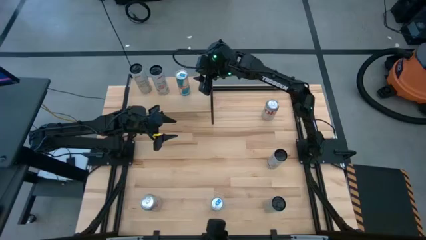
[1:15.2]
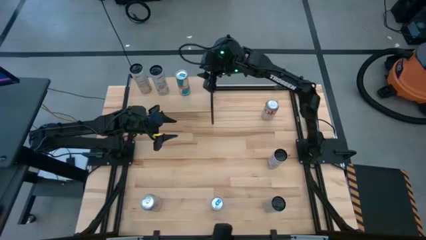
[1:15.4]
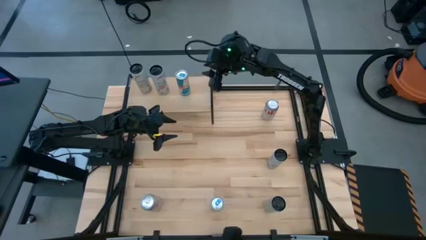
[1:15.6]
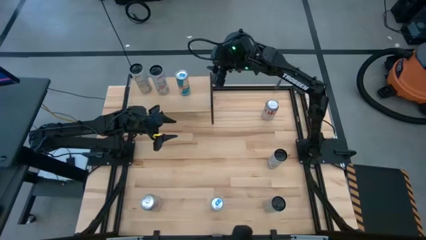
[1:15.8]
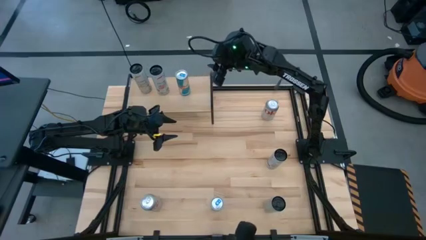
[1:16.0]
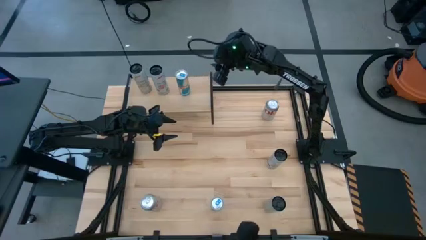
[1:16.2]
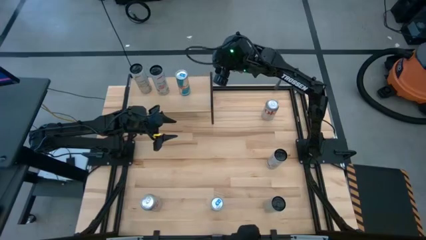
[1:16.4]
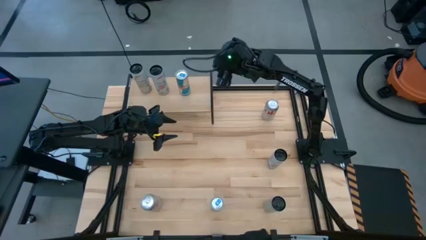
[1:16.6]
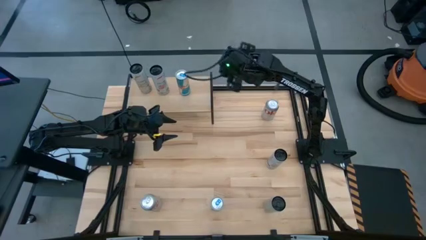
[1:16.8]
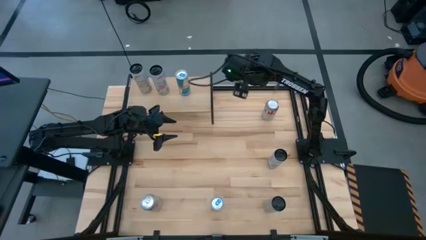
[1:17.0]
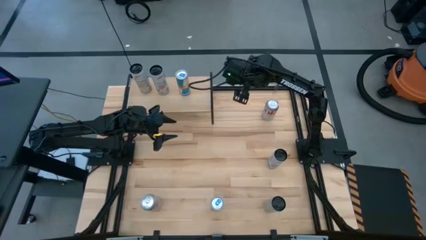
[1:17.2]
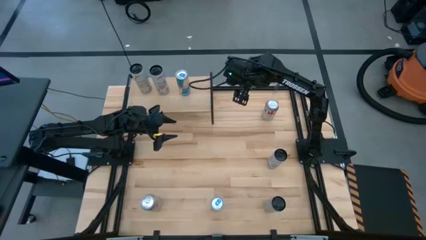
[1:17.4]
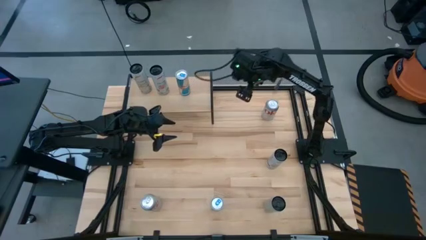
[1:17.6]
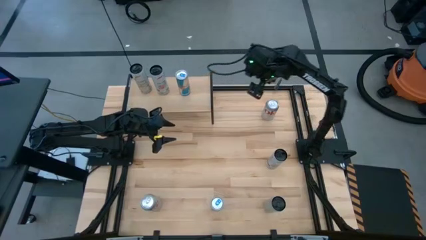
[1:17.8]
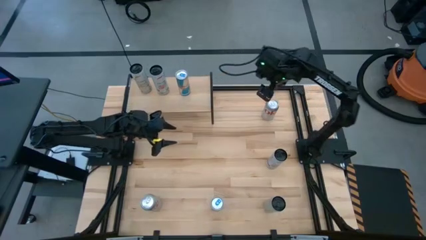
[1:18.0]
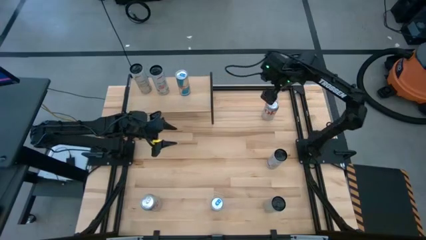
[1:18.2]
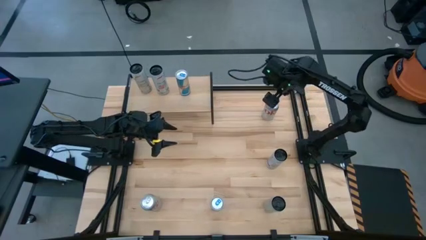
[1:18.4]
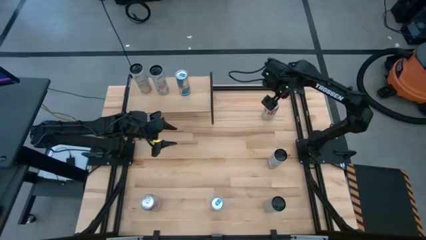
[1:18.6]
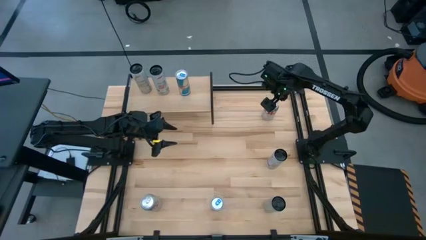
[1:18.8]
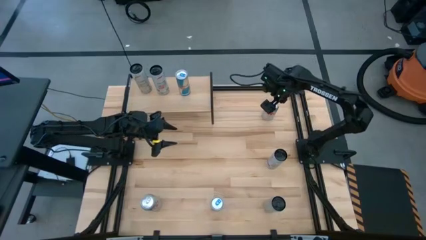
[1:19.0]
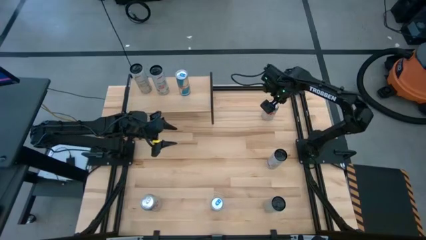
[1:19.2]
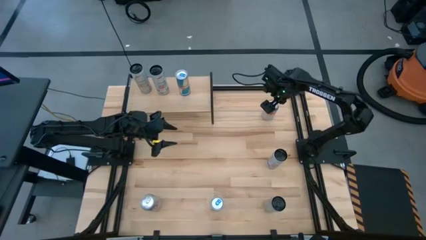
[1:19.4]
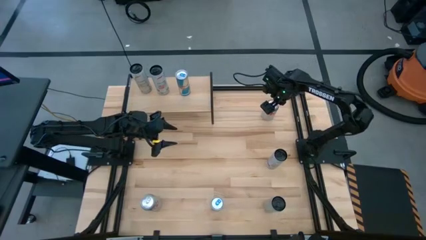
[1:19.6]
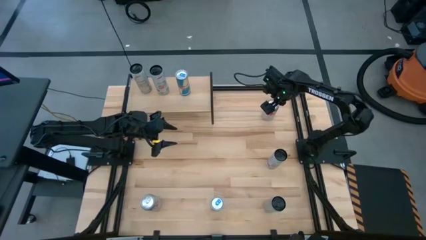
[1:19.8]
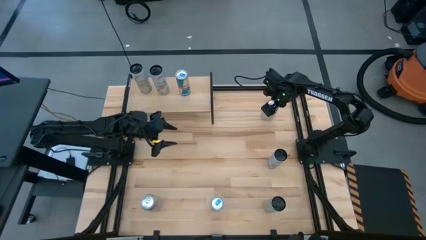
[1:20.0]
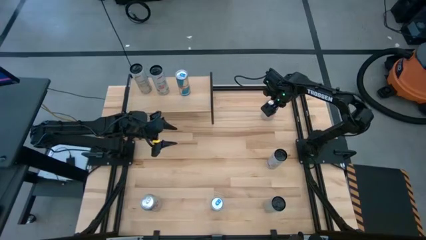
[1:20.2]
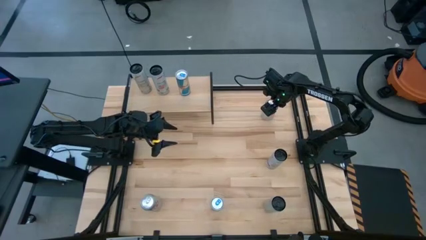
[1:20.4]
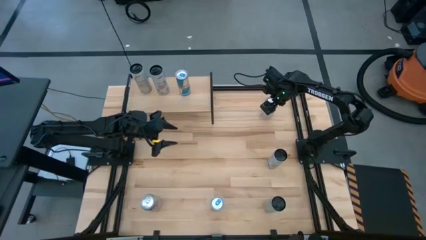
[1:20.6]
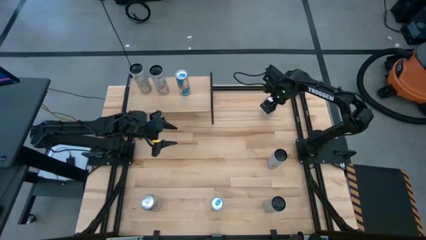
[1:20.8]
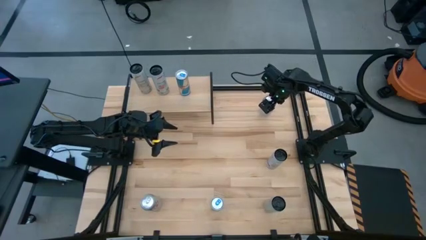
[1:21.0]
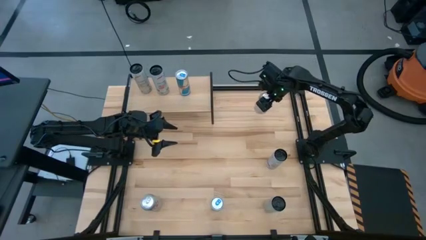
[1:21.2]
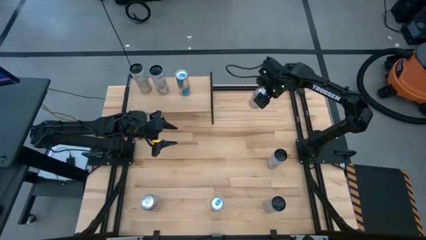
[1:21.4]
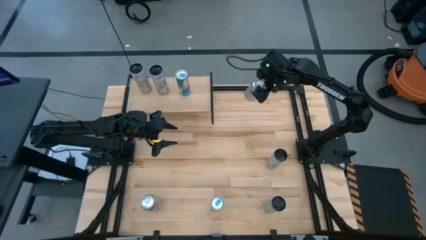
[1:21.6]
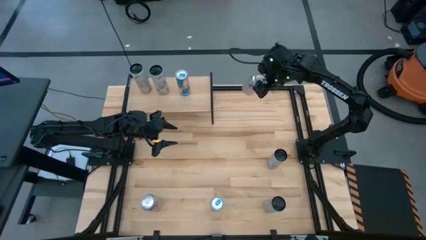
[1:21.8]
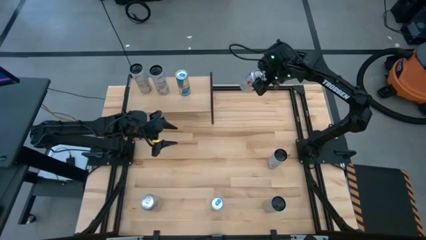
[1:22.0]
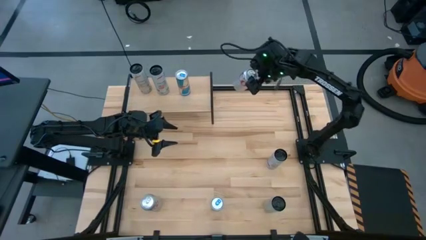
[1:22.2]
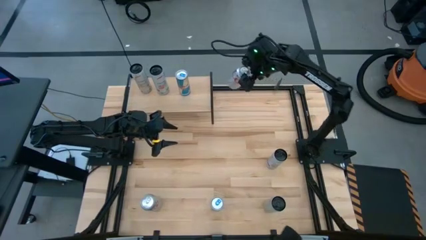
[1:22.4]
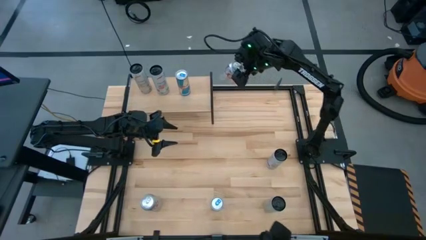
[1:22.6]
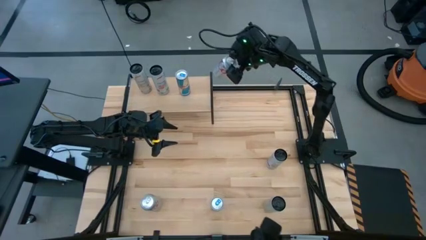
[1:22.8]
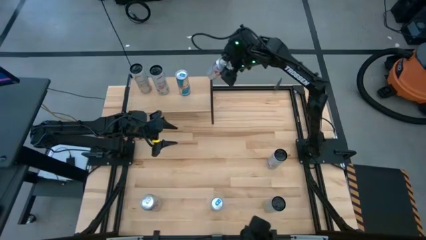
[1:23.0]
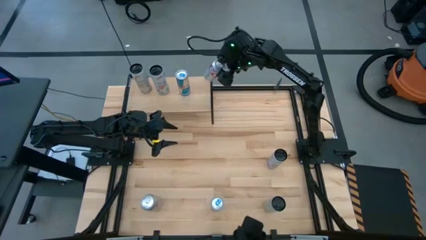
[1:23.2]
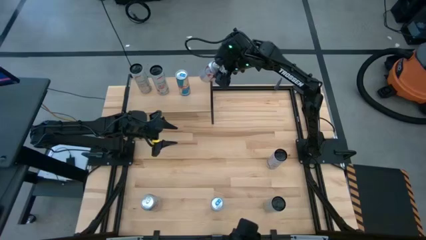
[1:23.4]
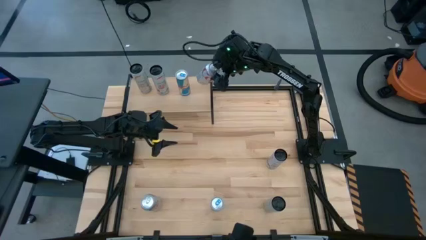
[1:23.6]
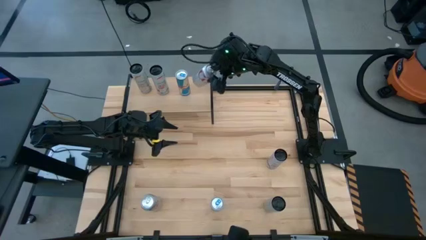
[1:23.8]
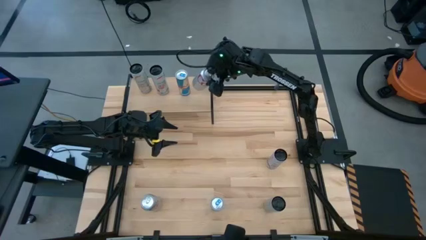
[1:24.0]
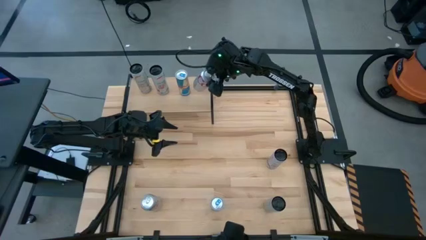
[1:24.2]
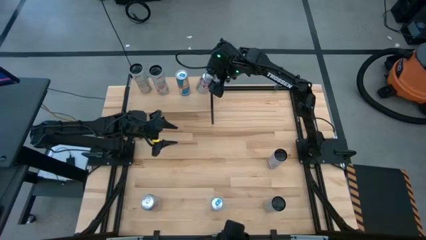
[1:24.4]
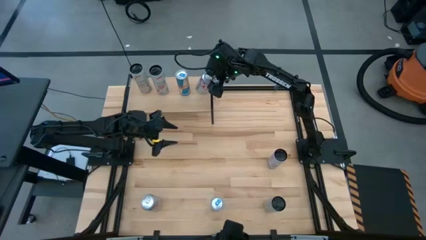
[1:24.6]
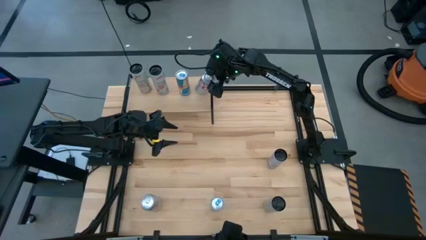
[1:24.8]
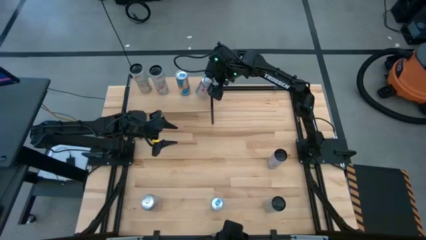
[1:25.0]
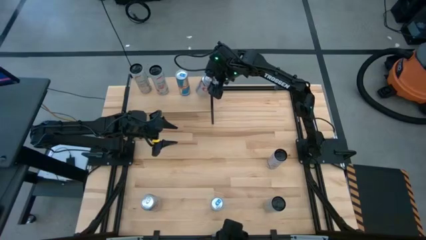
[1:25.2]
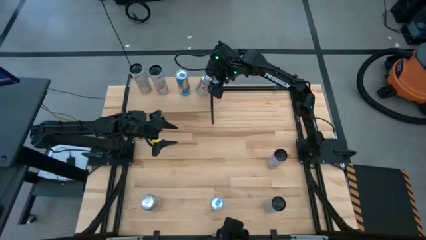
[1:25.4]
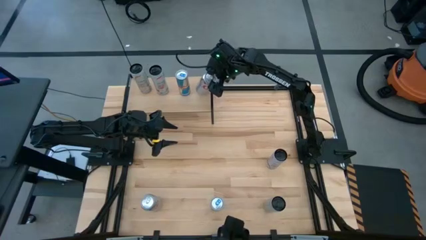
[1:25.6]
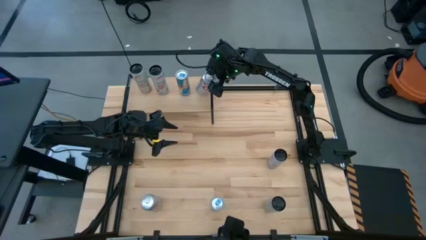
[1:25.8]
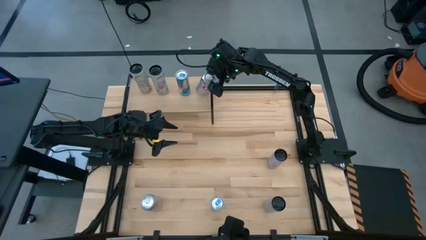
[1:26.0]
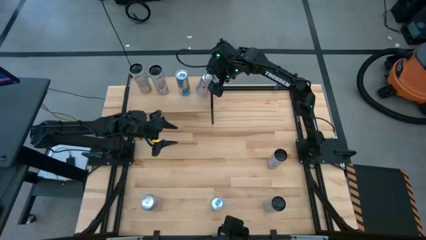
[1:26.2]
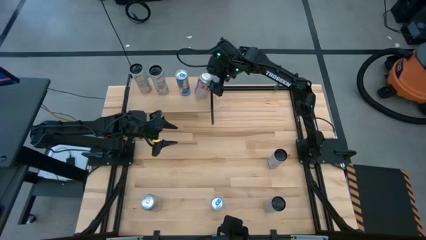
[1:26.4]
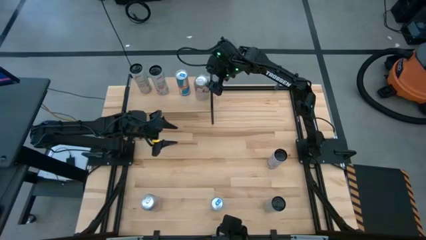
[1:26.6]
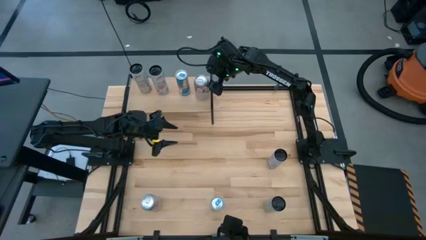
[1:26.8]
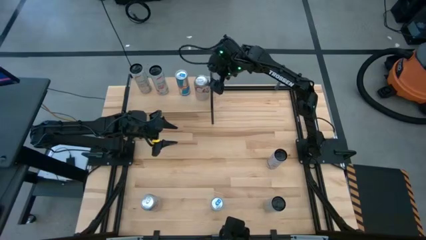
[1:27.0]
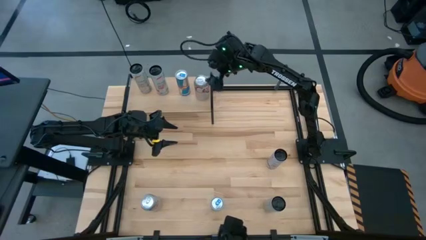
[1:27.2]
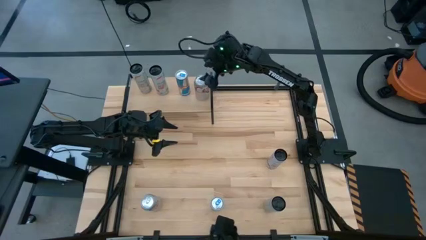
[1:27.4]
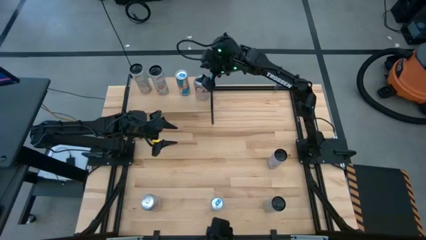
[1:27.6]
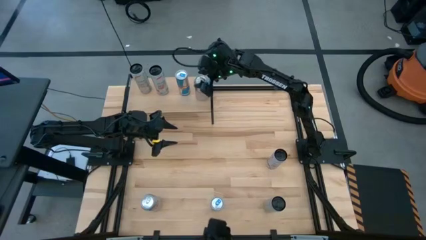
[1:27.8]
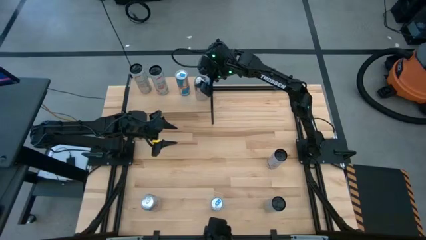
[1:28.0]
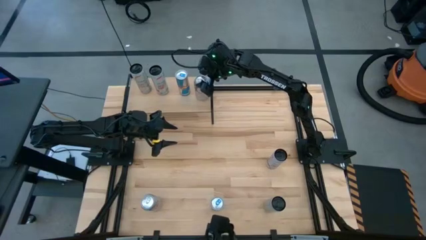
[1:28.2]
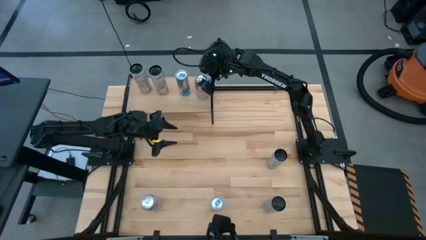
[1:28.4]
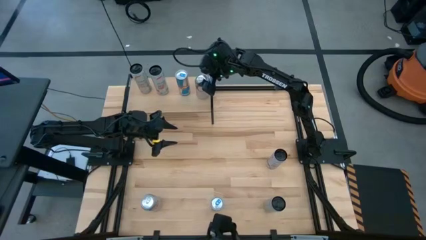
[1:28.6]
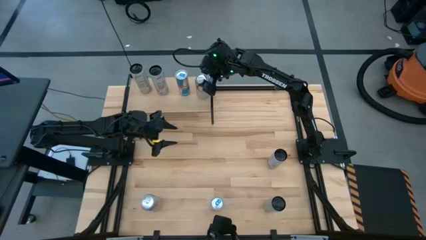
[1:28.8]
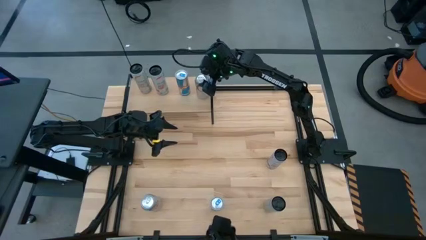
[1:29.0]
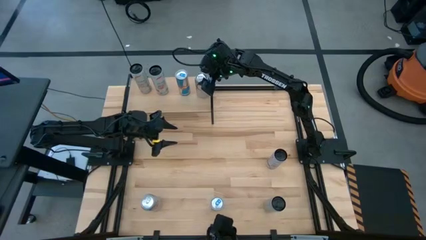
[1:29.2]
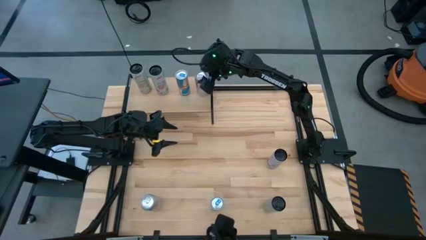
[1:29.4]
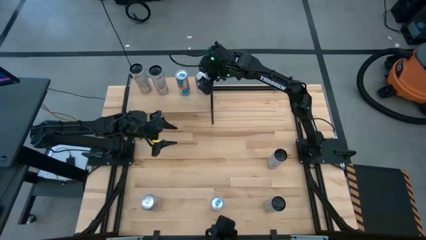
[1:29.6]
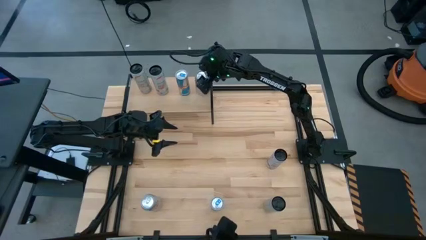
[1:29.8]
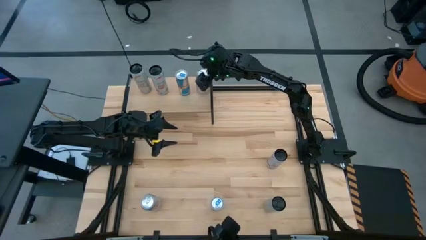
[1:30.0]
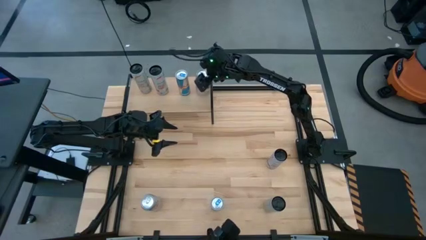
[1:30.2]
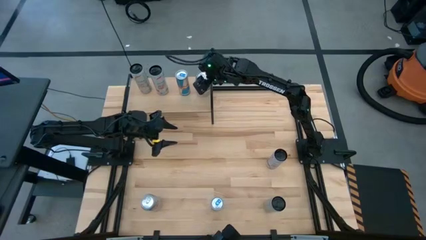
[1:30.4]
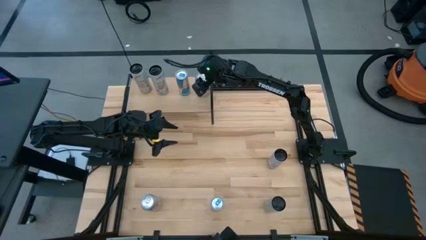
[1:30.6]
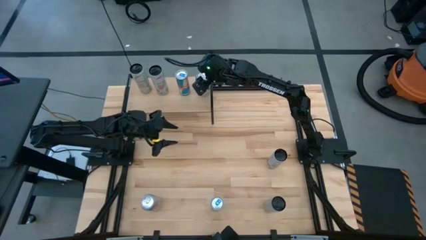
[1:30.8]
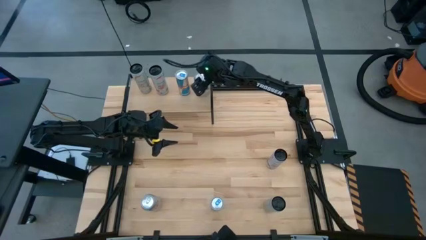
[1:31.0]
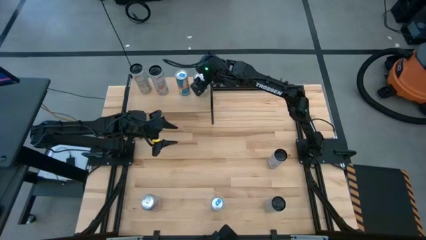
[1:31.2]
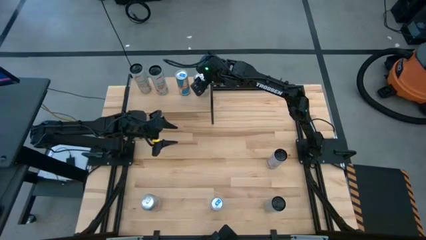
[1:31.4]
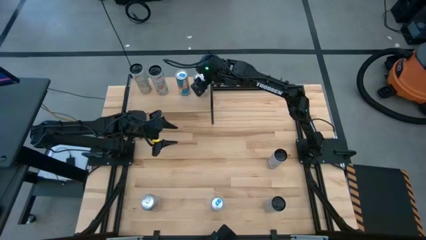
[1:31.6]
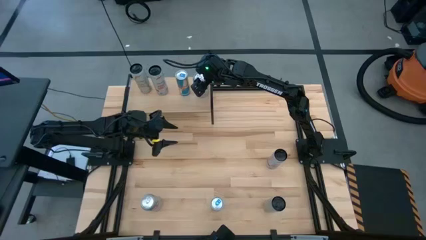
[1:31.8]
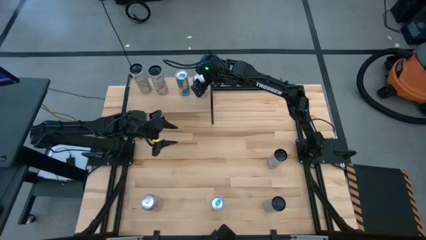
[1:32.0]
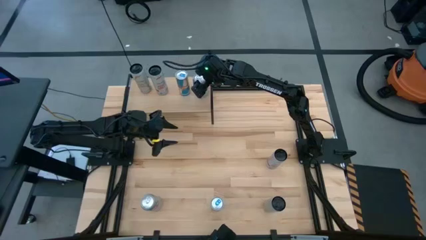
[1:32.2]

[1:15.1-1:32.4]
Task: Place canned beverage on shelf
Put the top red-silver soda can on the shelf
